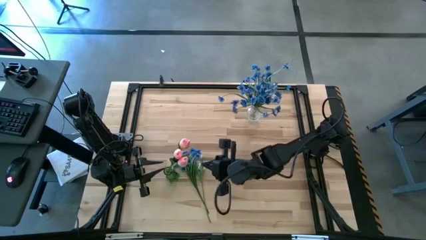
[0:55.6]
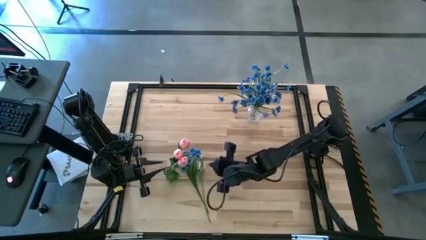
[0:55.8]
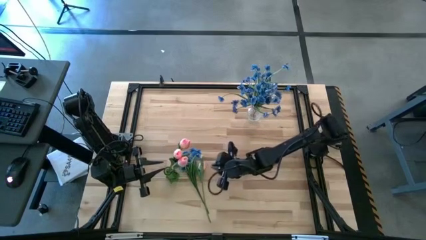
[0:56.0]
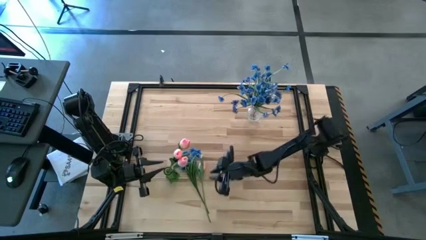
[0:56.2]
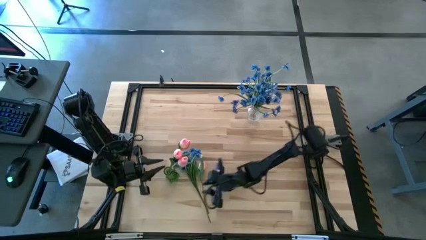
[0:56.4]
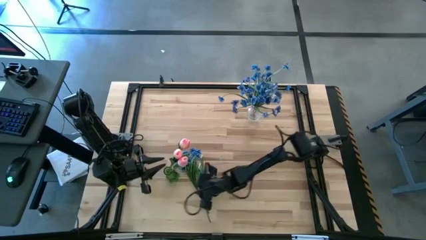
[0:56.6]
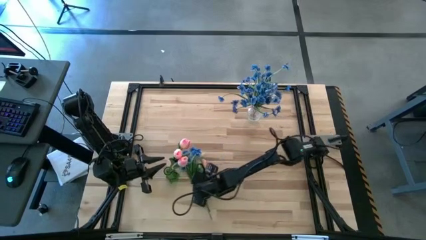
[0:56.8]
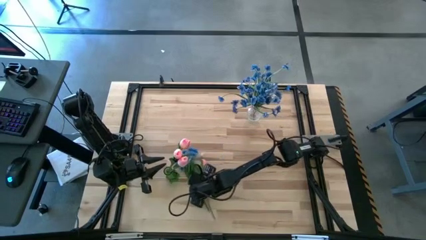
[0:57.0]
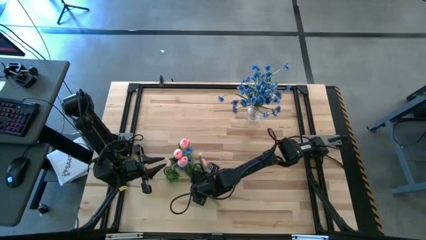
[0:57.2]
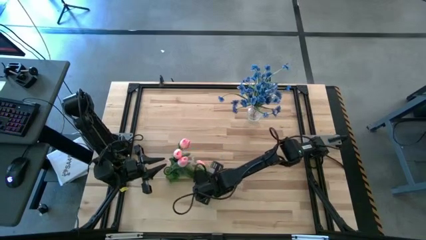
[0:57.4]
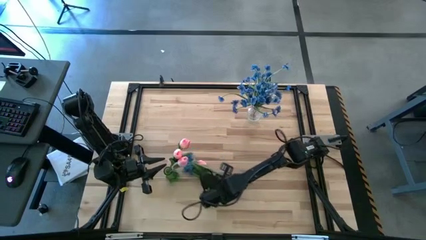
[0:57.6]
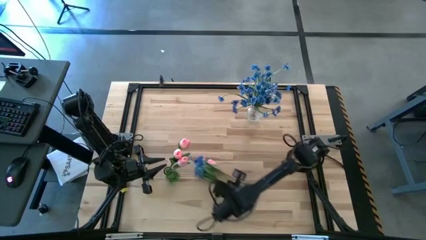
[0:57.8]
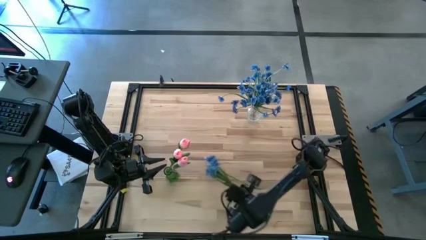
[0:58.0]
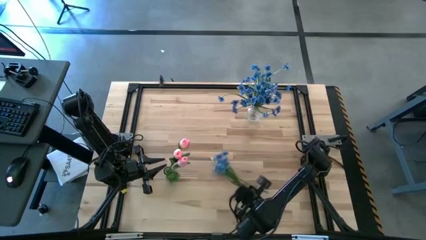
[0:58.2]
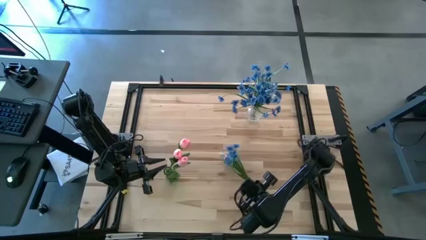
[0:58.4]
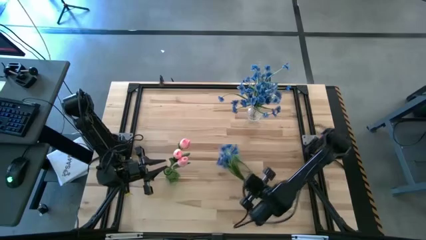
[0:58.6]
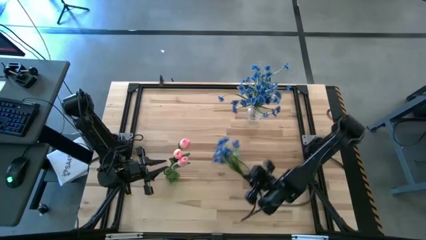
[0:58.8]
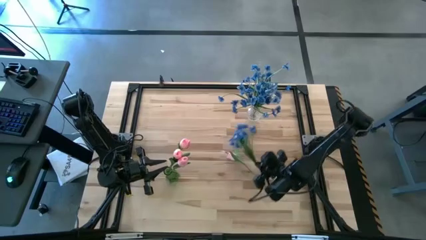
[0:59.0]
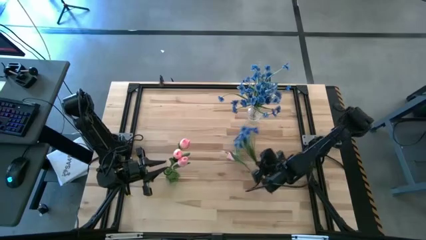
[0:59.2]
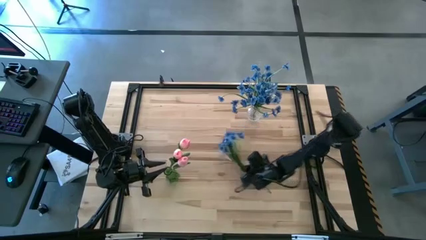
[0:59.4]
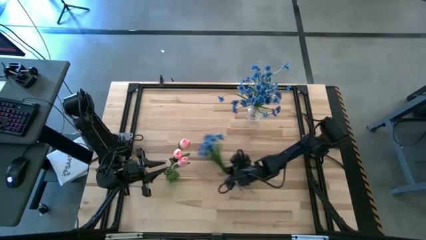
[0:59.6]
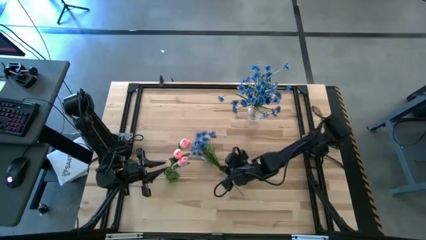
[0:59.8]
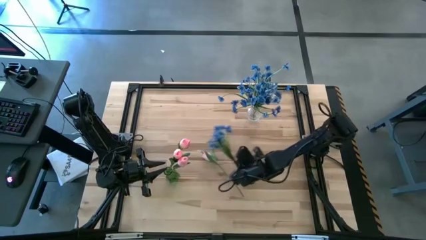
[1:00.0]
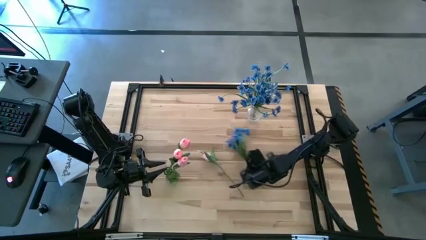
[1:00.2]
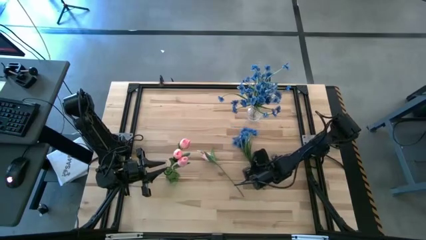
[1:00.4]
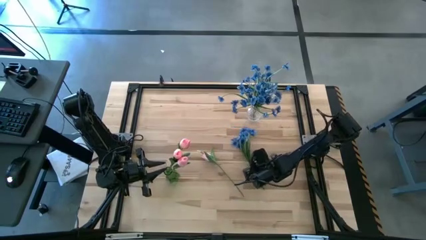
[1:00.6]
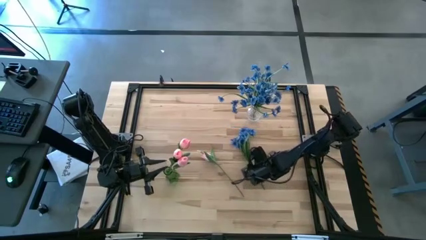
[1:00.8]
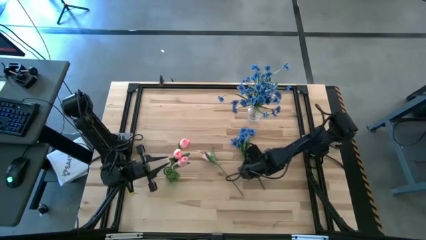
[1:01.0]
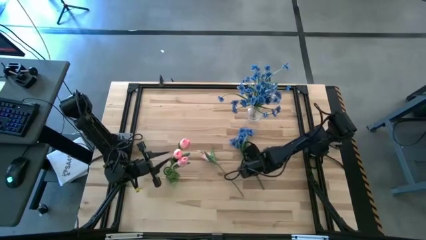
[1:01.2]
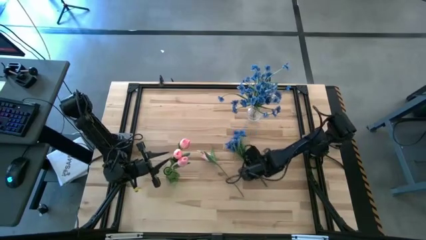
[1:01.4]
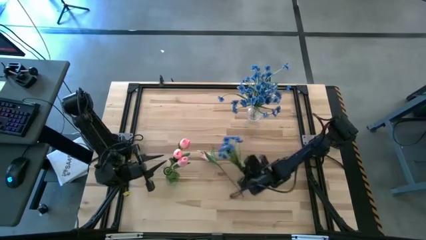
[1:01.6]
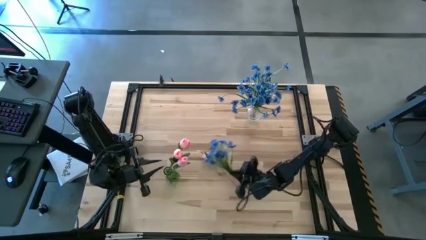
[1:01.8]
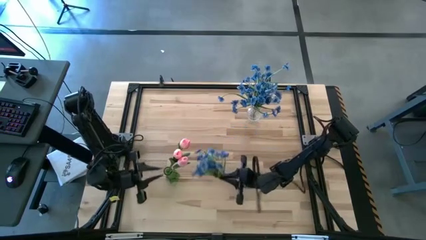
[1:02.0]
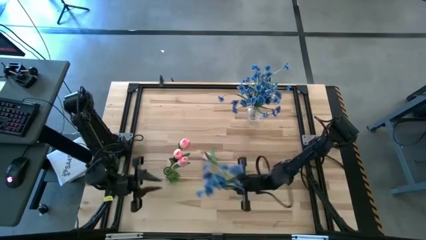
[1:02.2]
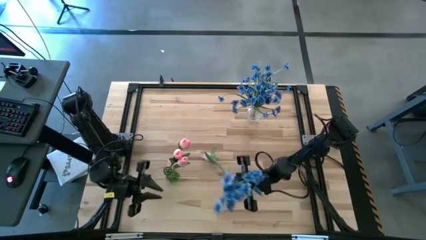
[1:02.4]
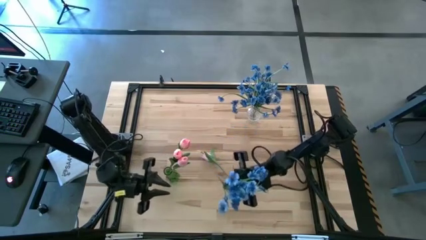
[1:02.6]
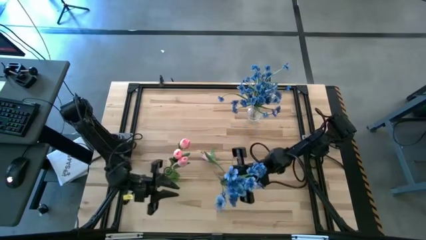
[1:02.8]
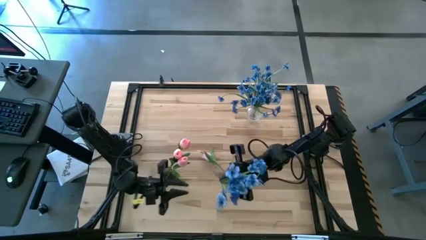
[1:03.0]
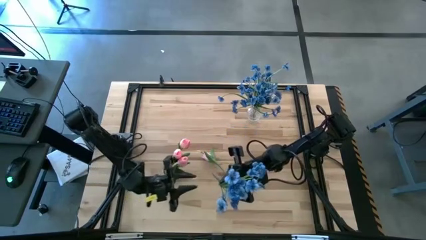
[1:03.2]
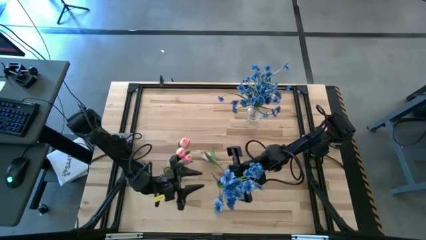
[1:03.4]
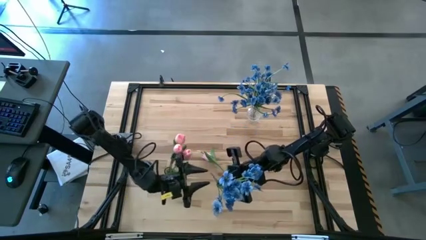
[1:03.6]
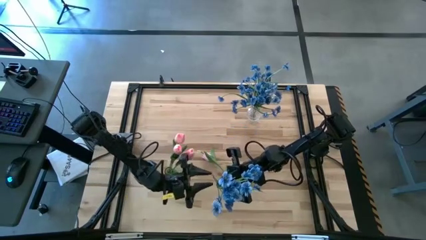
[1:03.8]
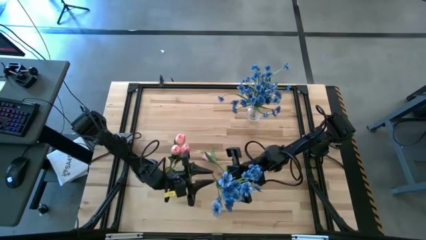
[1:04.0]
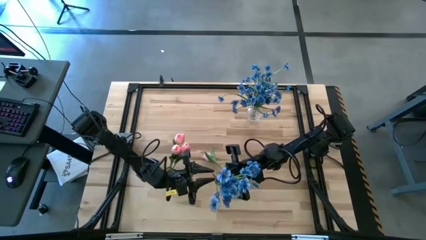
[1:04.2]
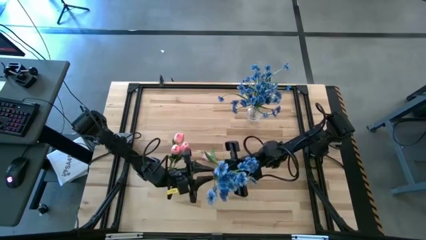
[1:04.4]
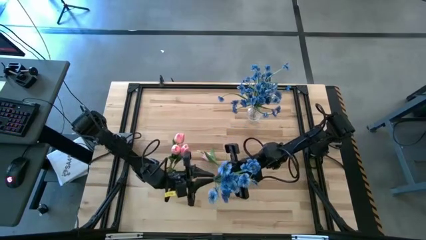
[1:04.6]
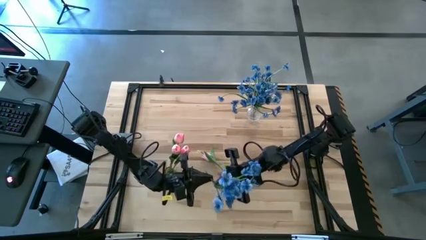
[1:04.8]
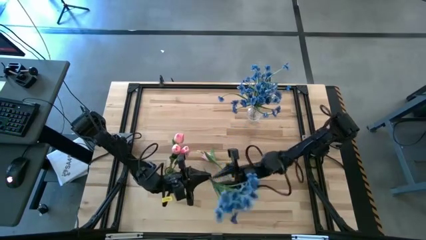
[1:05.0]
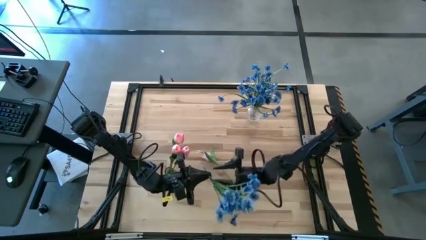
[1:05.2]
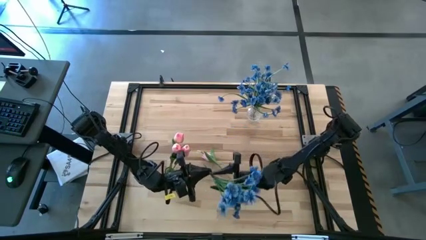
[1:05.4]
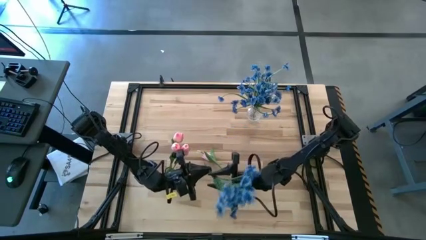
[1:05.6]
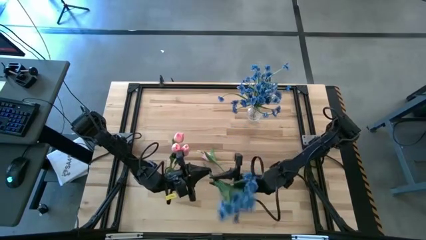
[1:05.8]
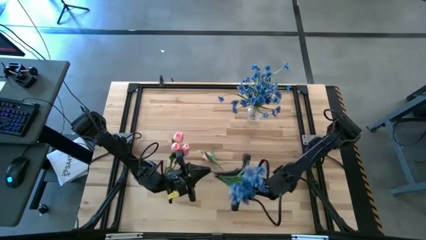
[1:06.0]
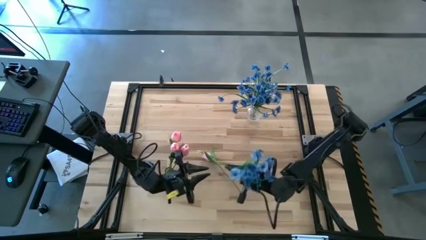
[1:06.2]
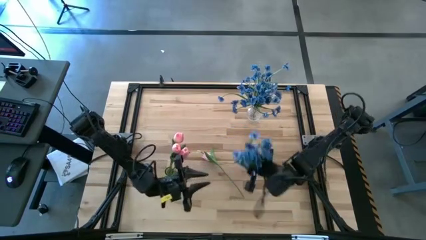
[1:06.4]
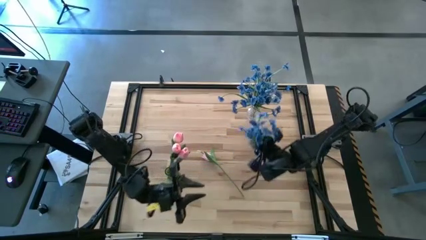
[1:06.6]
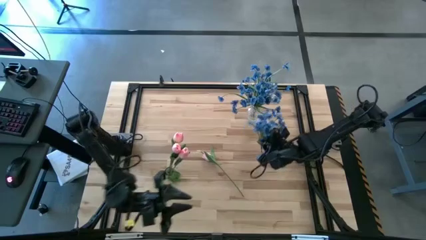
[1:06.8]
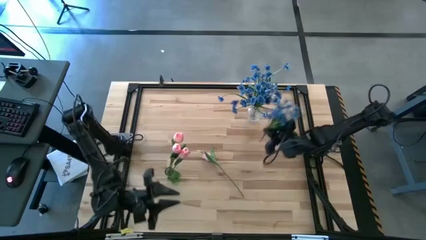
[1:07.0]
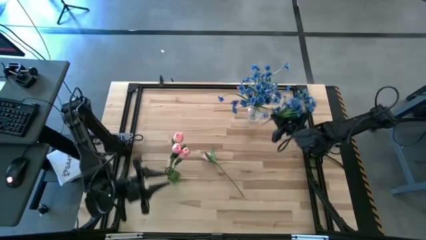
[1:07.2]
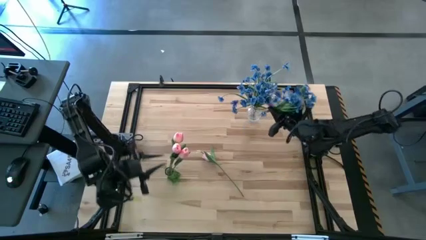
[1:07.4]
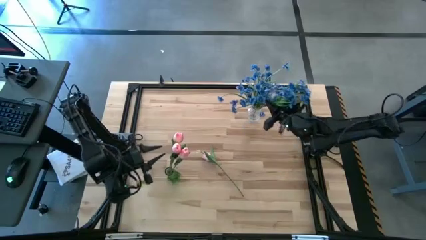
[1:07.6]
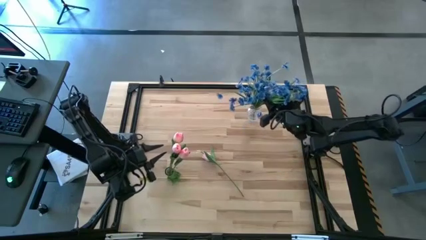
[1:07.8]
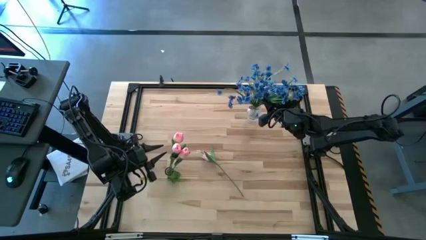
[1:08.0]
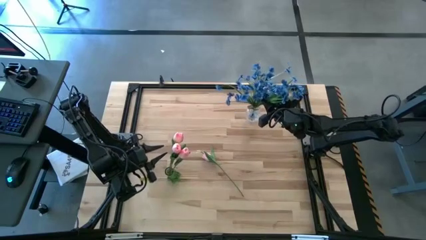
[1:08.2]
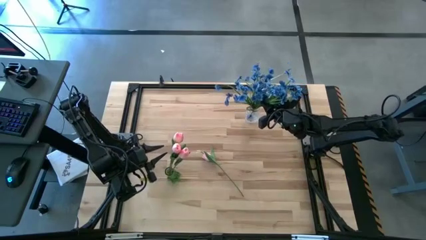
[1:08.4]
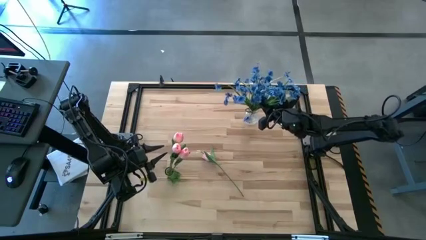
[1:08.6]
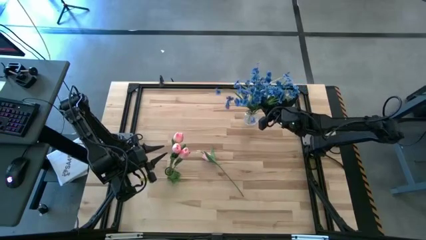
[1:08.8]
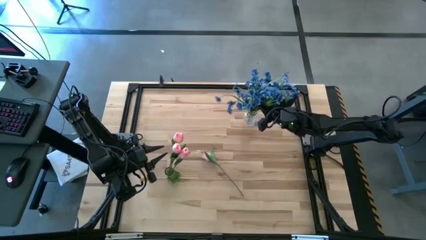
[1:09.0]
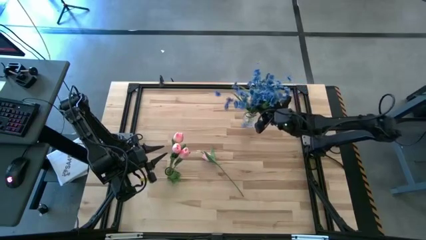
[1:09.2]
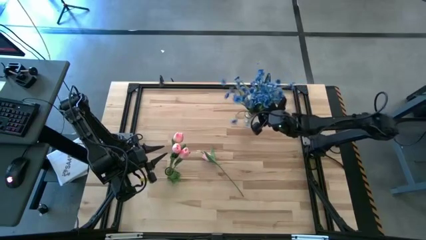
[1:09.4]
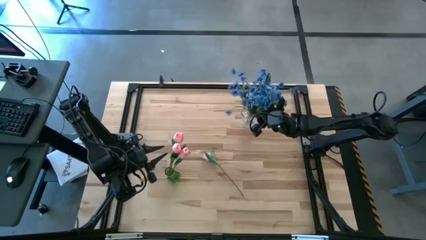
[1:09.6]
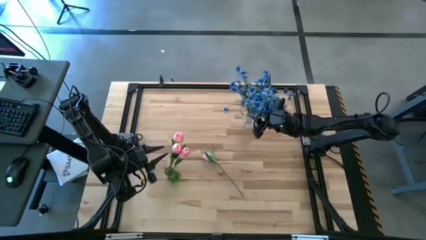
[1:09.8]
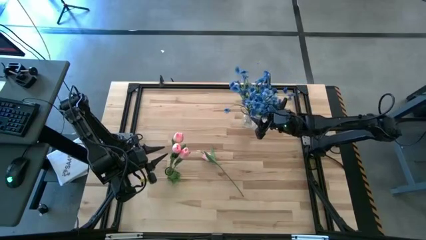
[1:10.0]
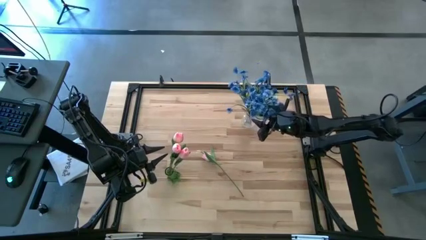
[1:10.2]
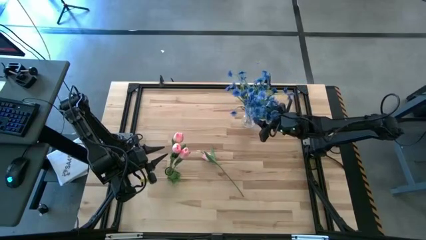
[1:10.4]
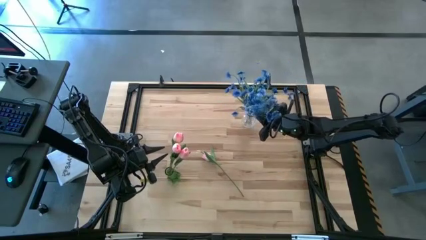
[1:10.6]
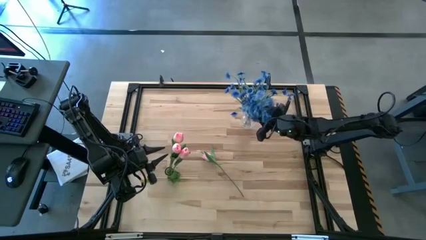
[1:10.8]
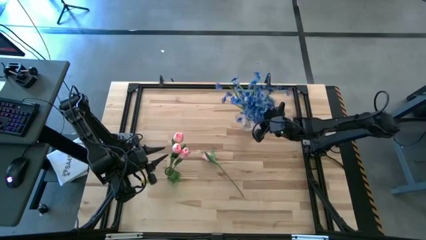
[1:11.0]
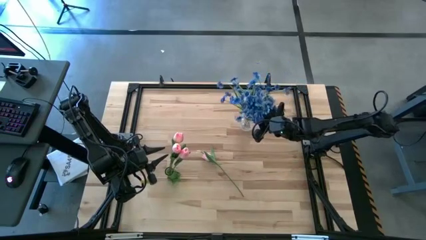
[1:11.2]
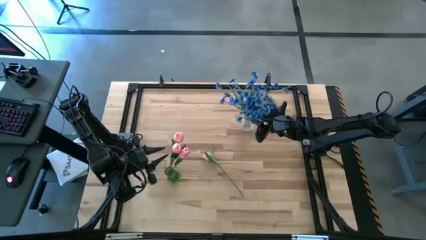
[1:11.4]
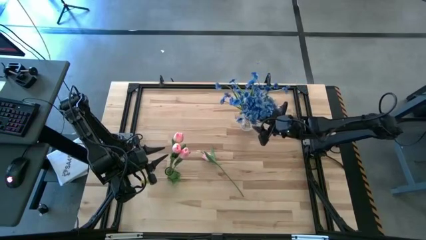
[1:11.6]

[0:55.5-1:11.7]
Task: Sort flowers into vase by color
Put the blue flower into the transparent vase
